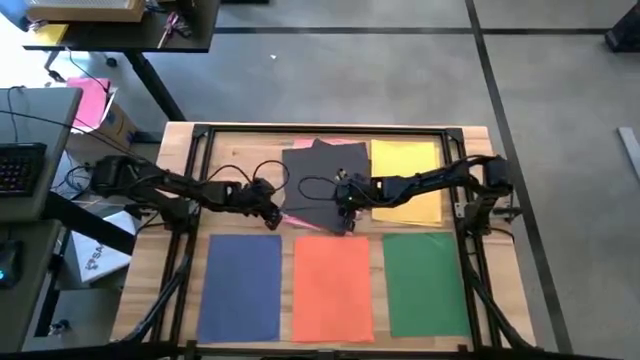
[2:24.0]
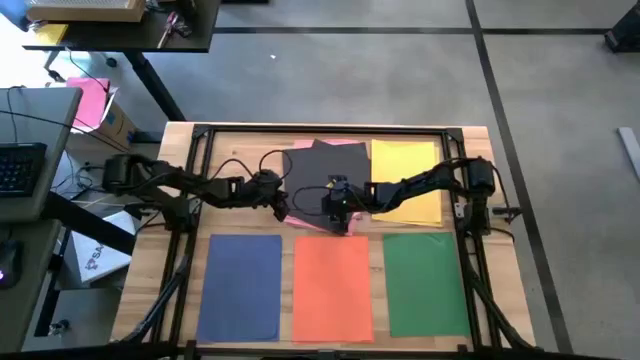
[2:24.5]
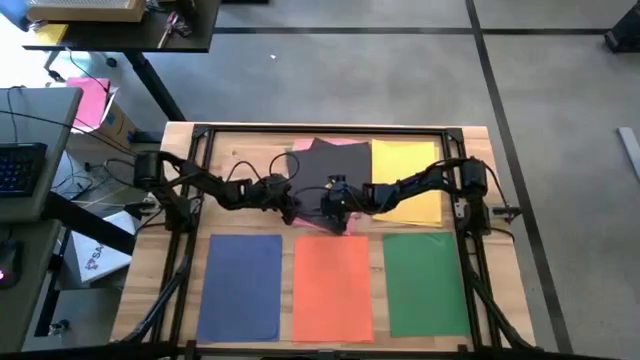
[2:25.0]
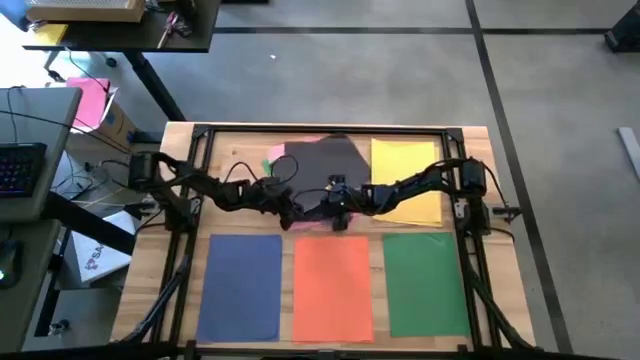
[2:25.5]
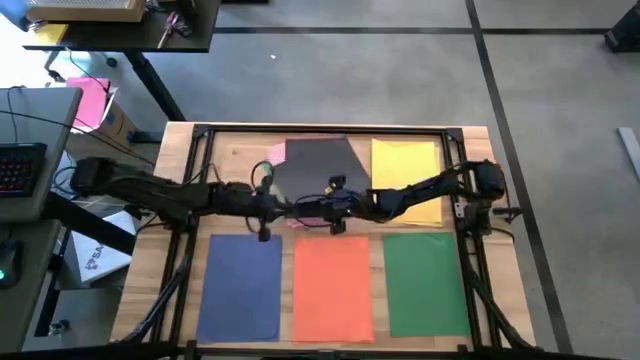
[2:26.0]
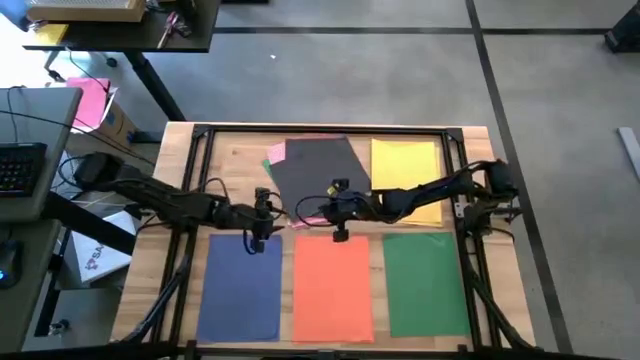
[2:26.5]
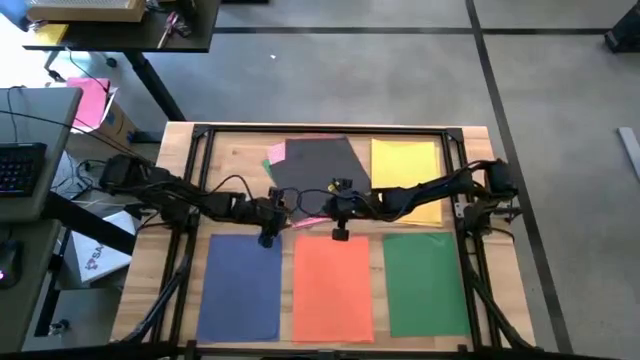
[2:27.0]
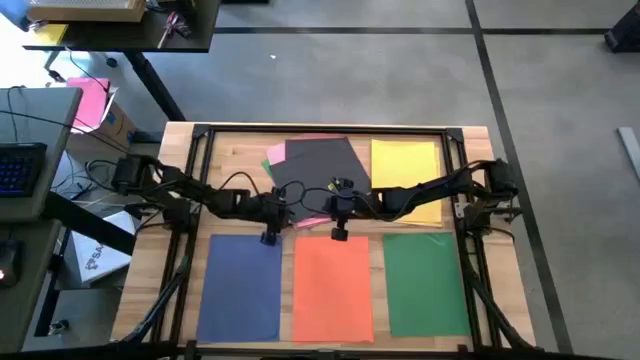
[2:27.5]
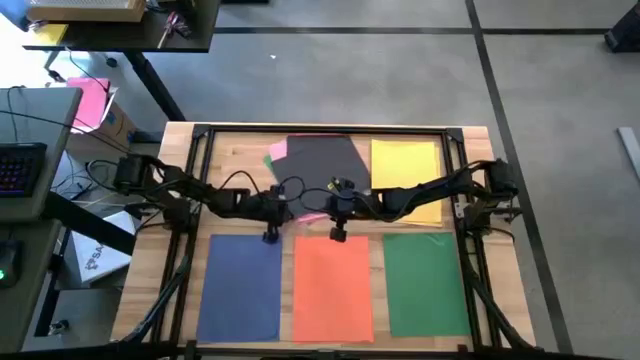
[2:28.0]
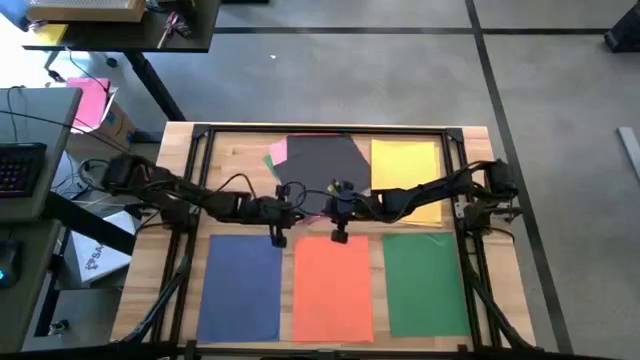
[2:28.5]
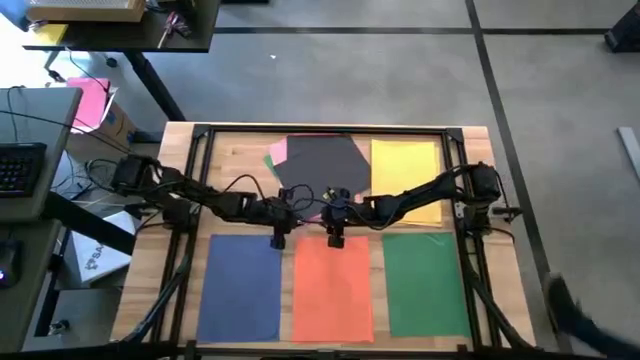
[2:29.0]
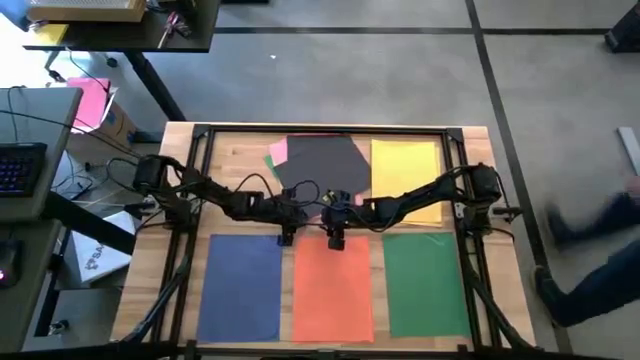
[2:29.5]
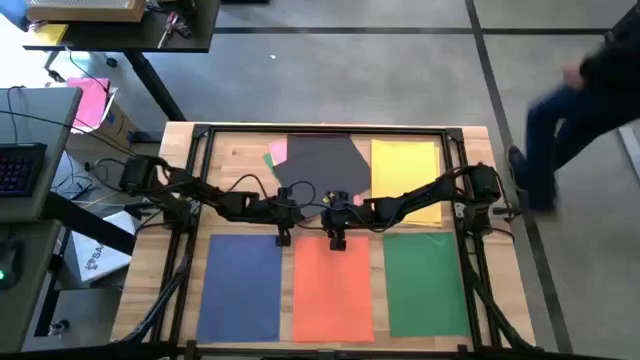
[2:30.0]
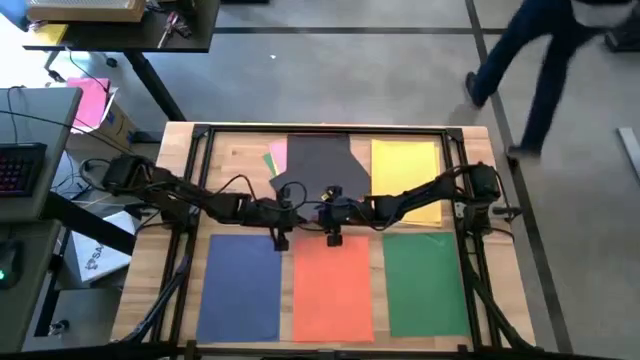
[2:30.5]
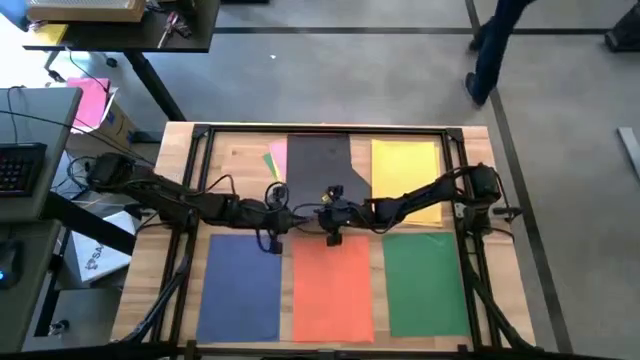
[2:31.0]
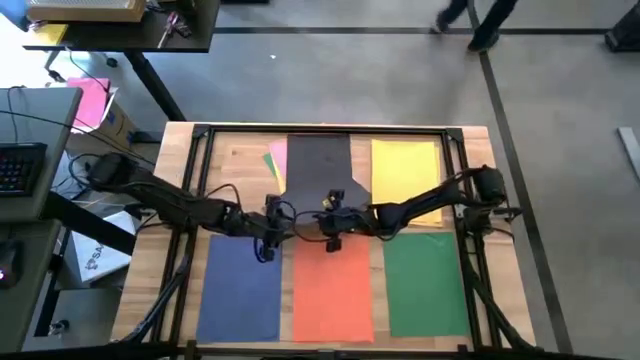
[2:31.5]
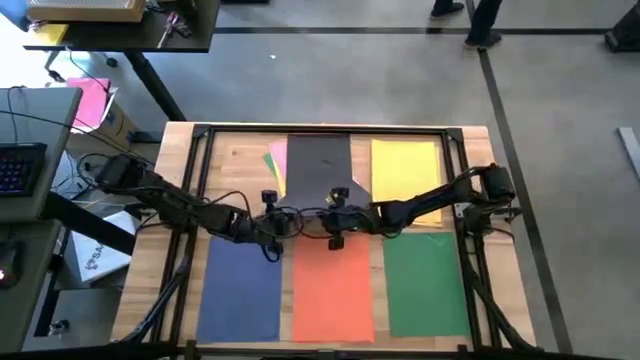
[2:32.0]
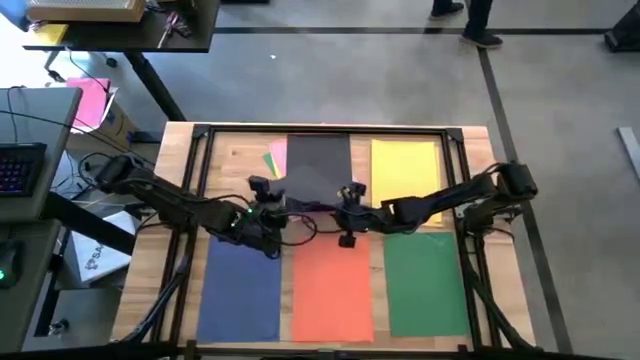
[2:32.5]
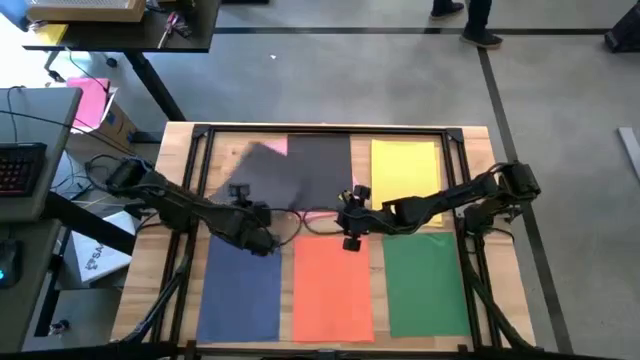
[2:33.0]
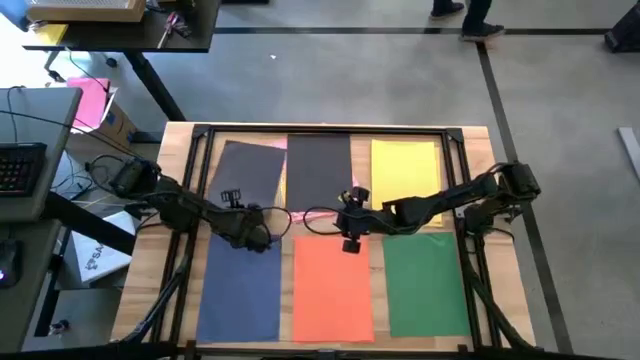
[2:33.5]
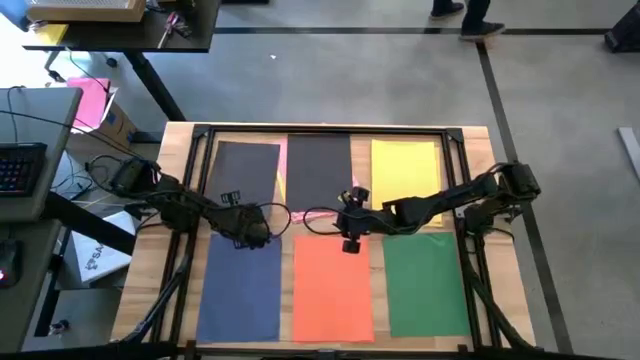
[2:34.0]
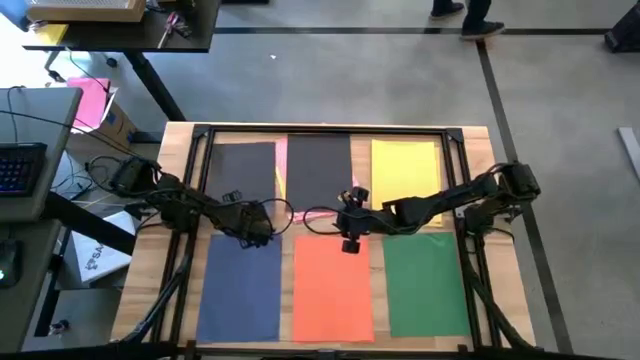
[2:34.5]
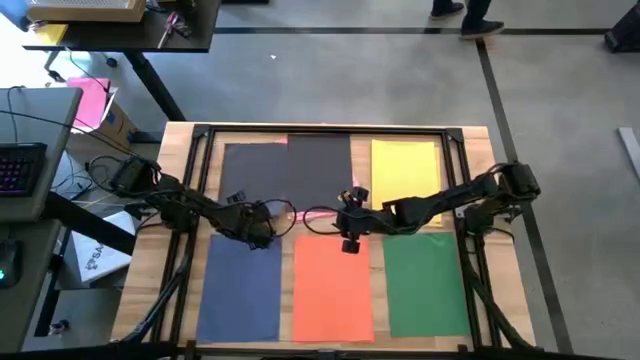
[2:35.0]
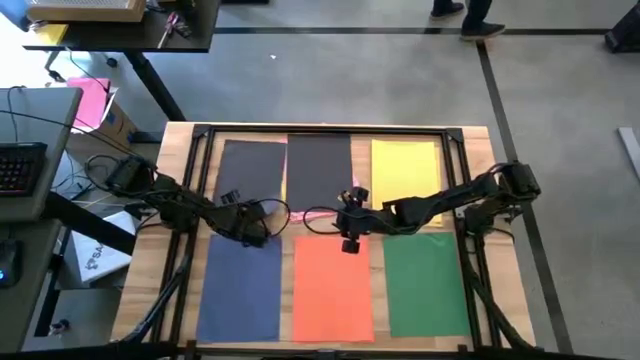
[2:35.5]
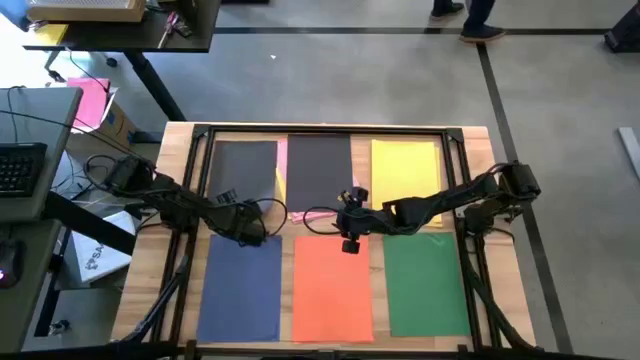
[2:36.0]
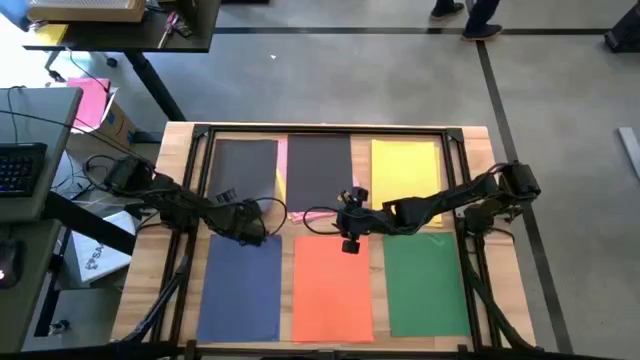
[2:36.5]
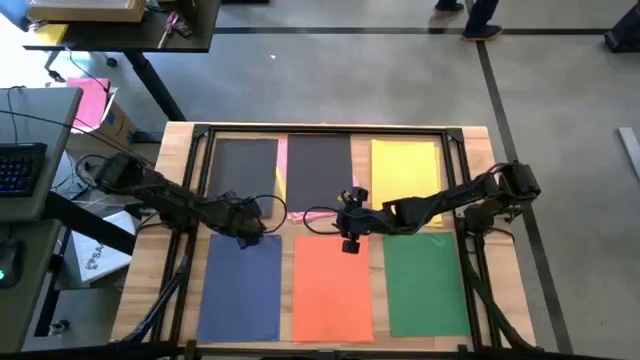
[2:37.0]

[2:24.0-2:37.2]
Task: Organize paper
Put the black paper to the top left of the table

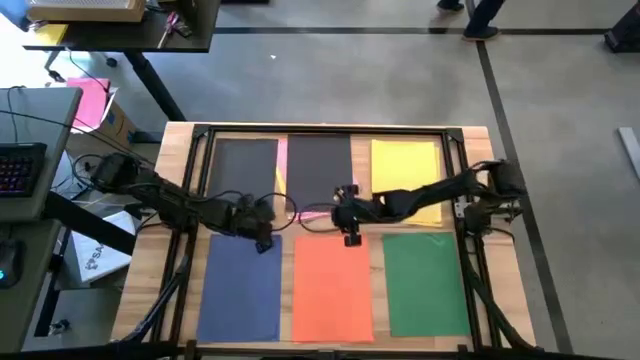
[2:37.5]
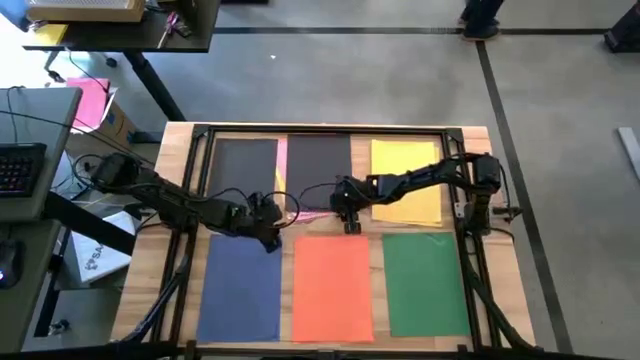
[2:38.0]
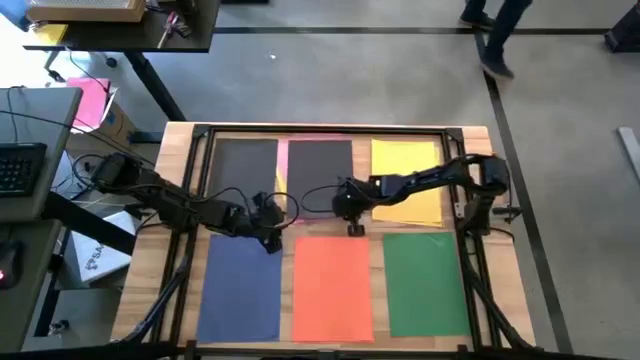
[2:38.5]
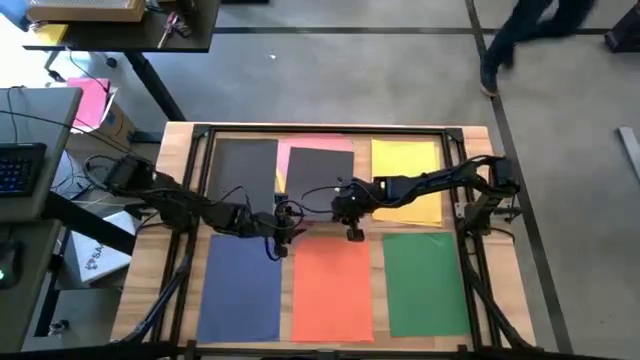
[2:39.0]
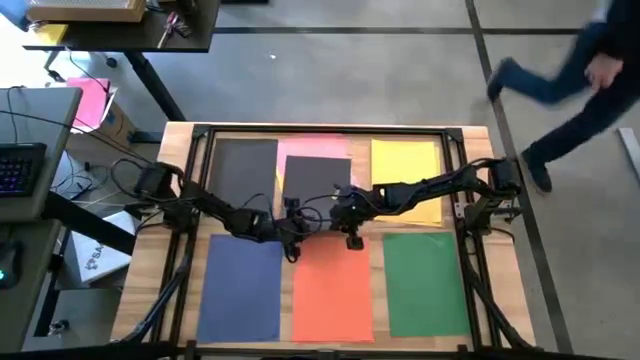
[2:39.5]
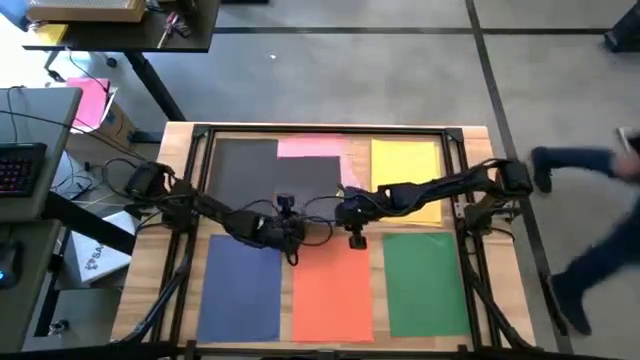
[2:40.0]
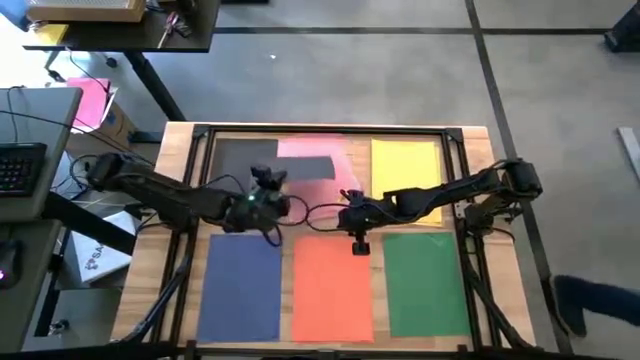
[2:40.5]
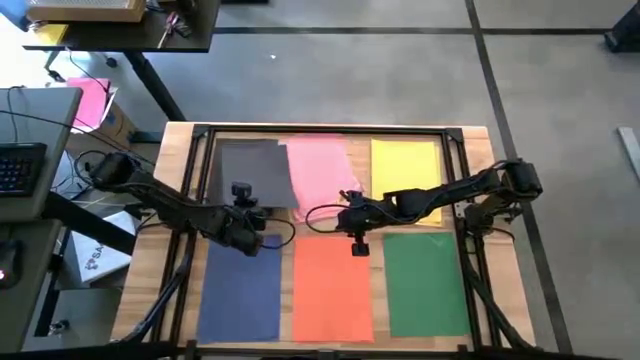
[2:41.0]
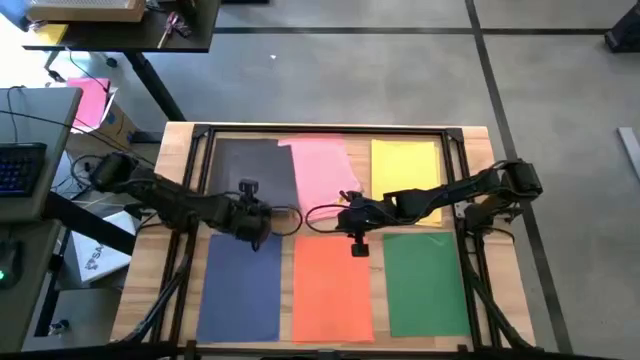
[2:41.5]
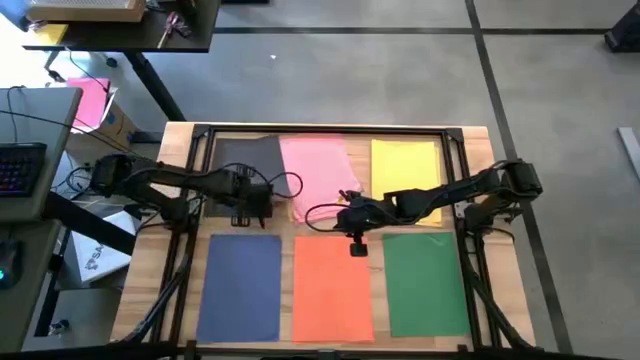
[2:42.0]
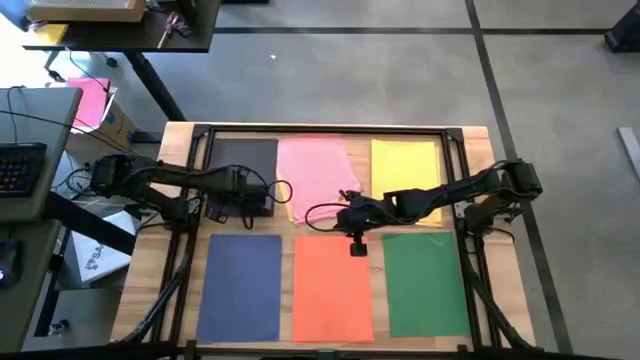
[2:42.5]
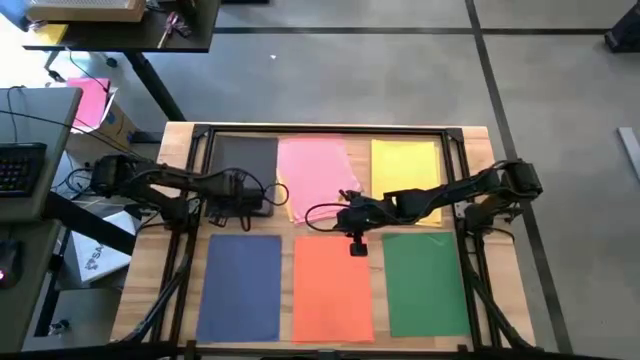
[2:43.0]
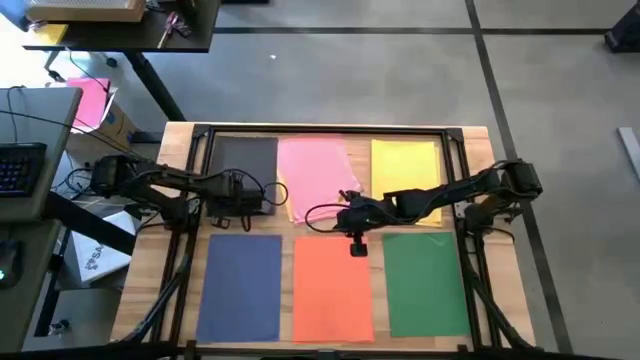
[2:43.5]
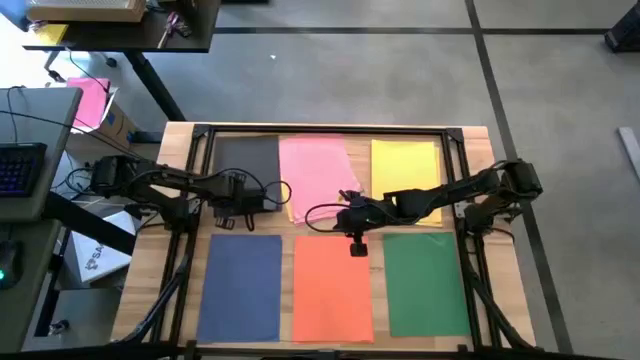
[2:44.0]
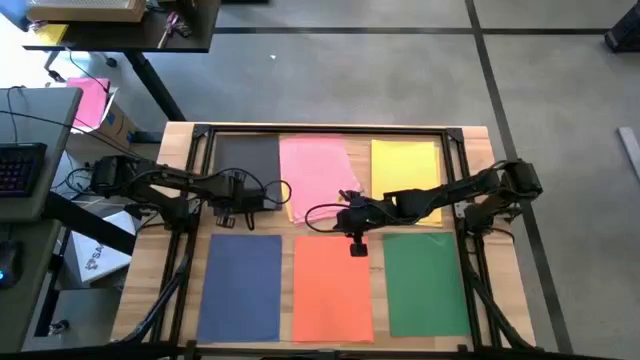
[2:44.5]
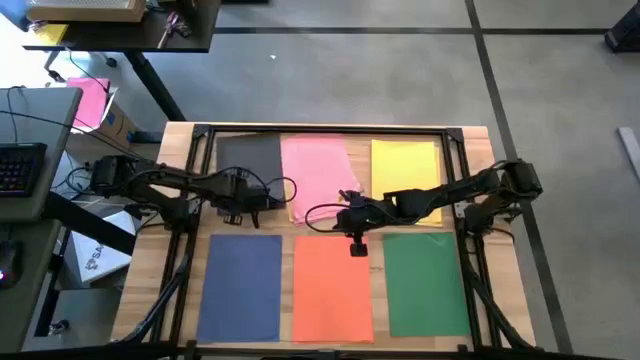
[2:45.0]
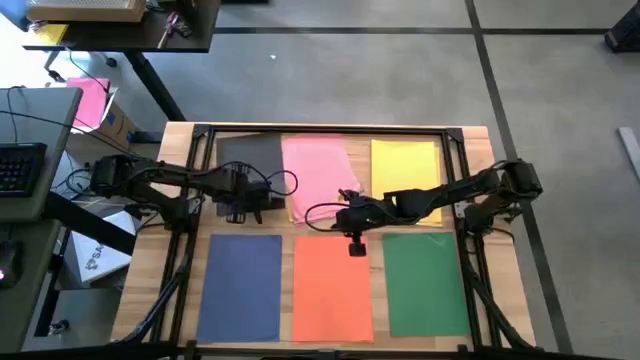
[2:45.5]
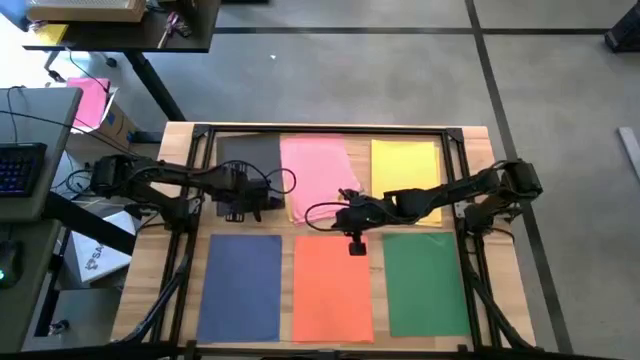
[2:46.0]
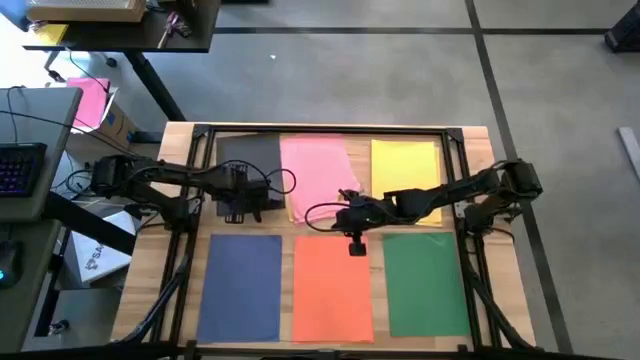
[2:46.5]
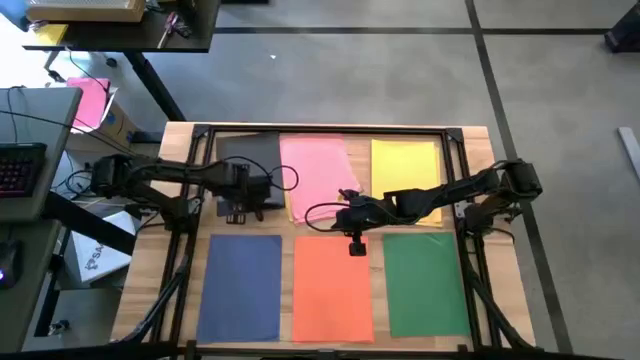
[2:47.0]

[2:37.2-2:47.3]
Stack the black paper on top of the black paper
